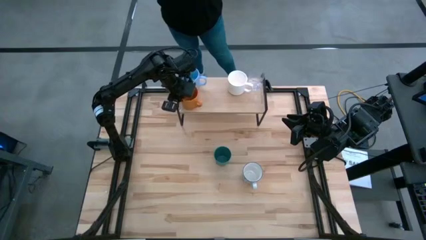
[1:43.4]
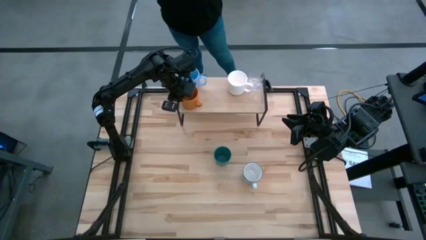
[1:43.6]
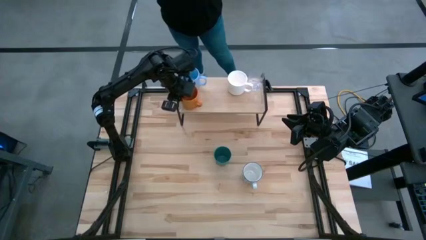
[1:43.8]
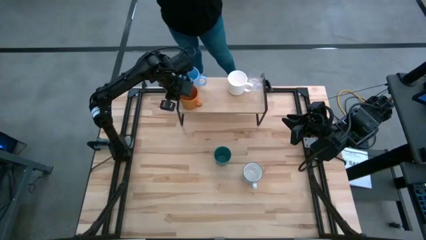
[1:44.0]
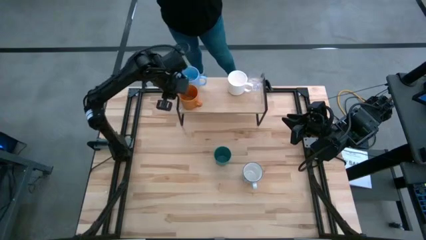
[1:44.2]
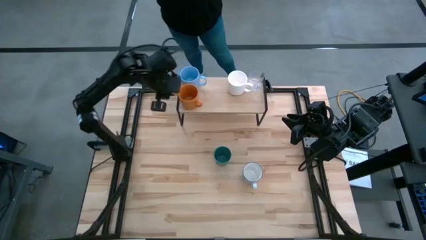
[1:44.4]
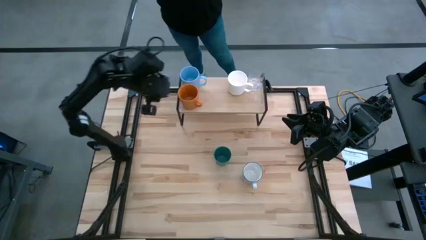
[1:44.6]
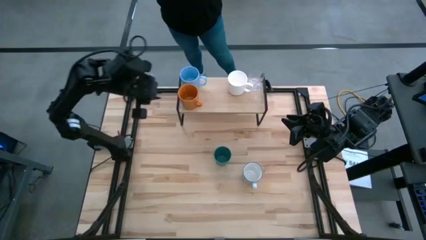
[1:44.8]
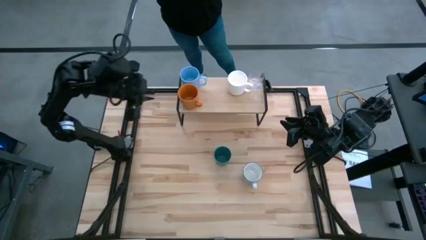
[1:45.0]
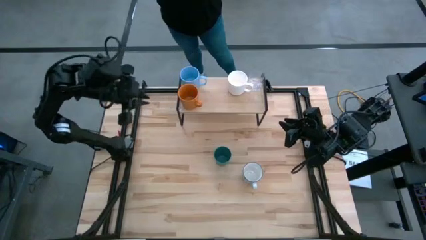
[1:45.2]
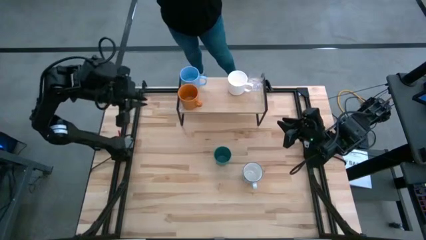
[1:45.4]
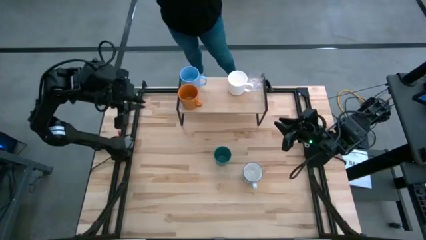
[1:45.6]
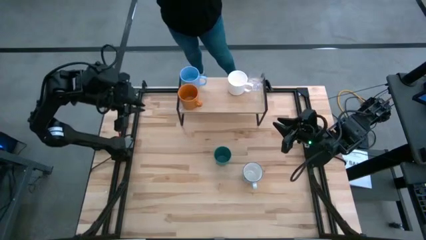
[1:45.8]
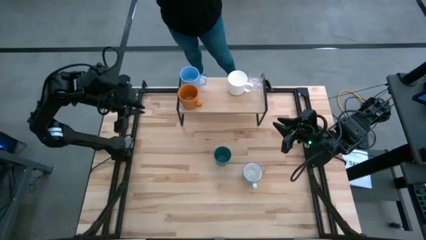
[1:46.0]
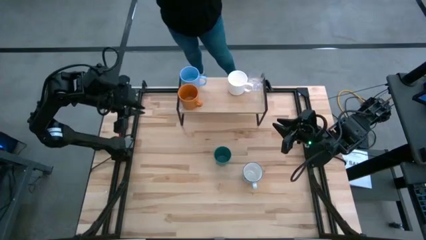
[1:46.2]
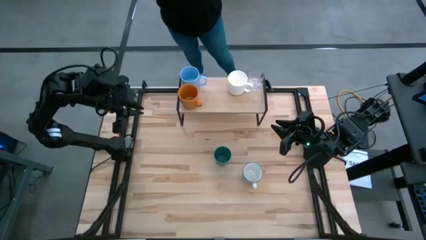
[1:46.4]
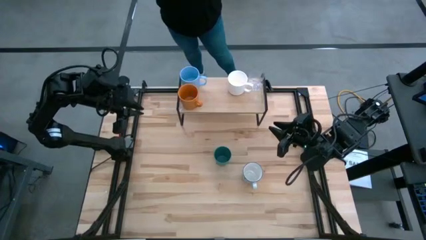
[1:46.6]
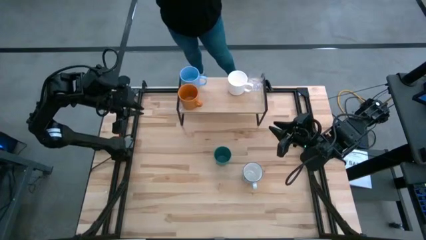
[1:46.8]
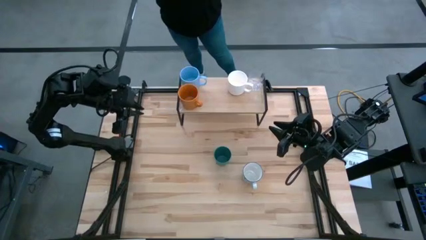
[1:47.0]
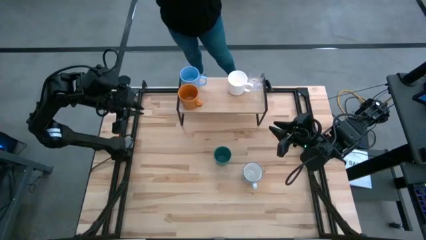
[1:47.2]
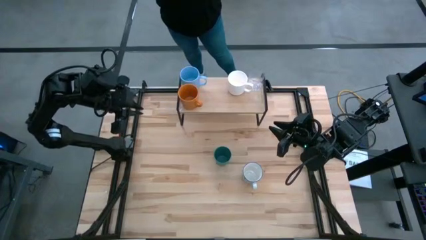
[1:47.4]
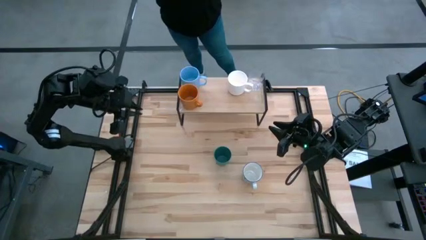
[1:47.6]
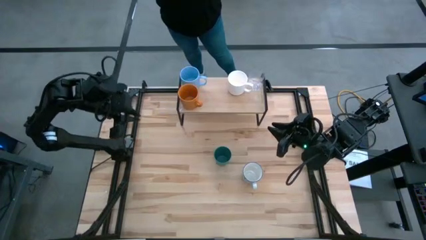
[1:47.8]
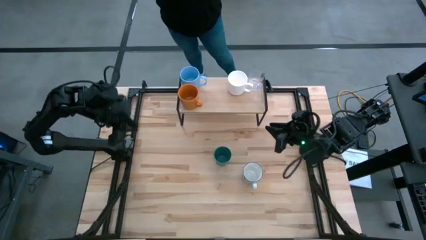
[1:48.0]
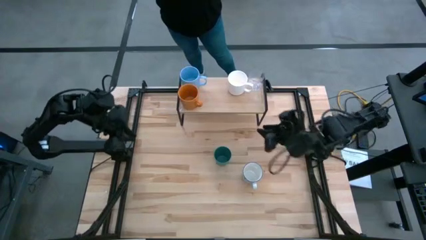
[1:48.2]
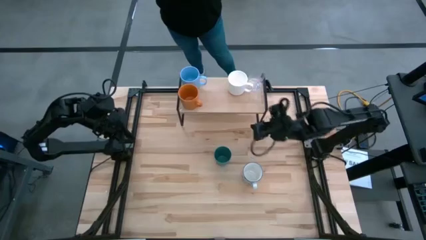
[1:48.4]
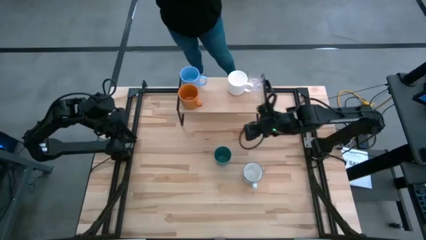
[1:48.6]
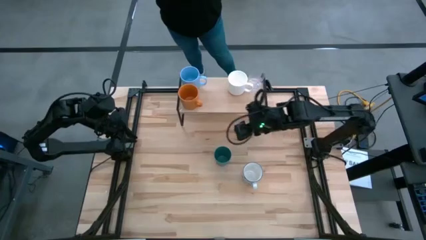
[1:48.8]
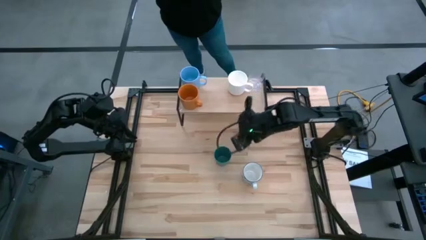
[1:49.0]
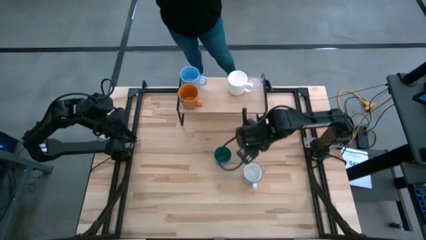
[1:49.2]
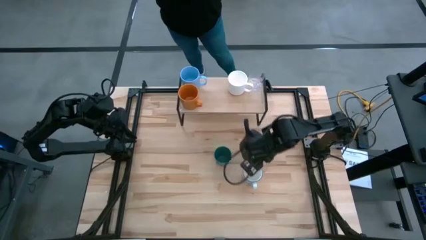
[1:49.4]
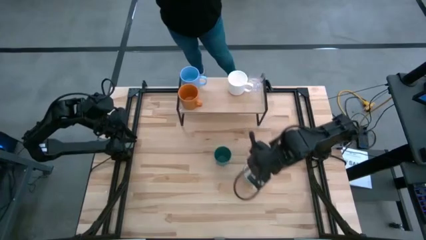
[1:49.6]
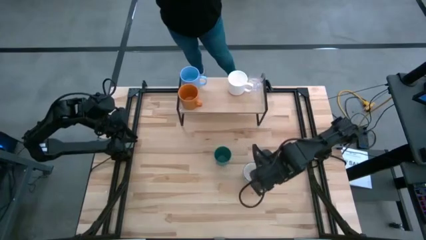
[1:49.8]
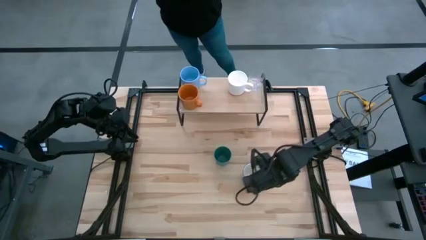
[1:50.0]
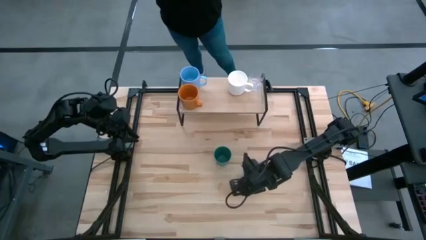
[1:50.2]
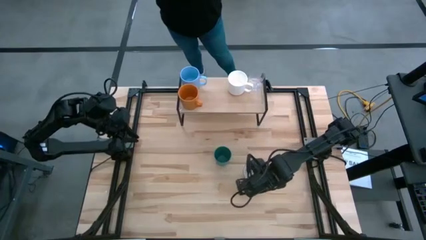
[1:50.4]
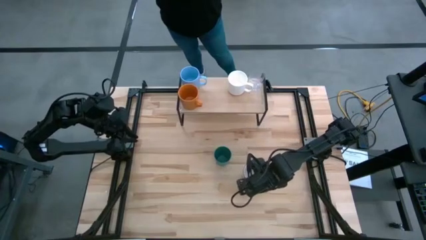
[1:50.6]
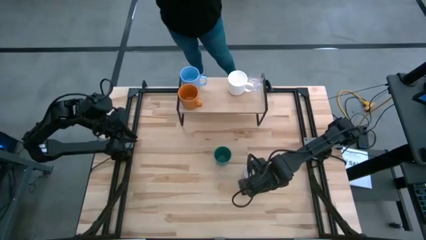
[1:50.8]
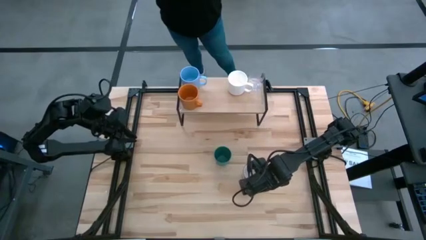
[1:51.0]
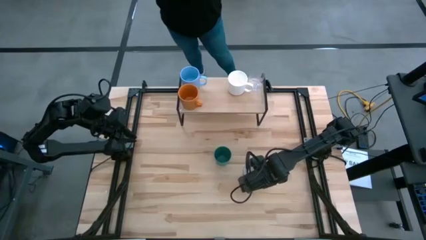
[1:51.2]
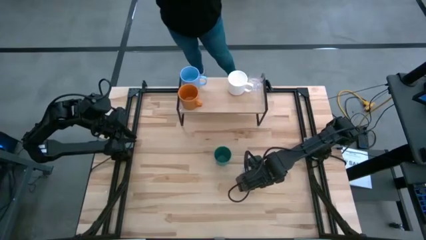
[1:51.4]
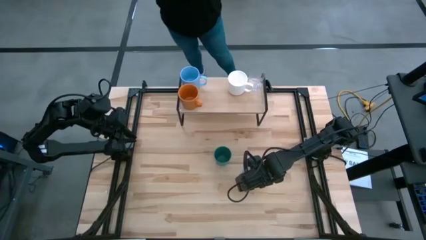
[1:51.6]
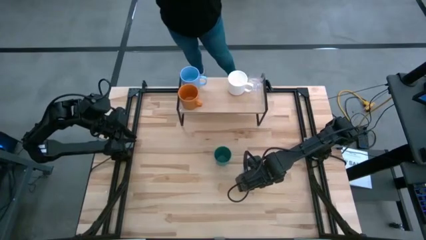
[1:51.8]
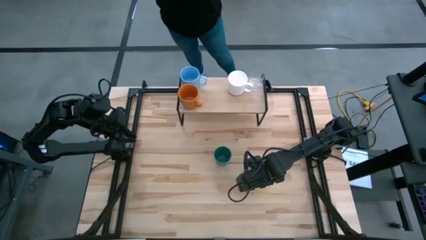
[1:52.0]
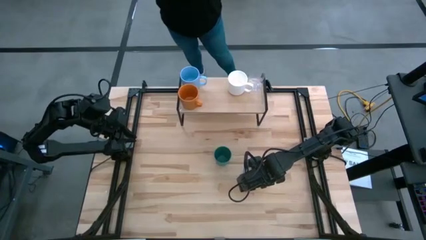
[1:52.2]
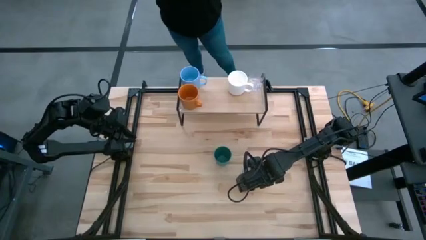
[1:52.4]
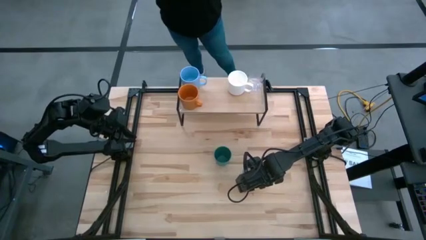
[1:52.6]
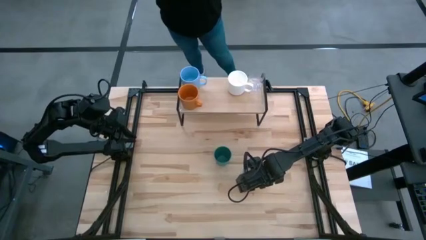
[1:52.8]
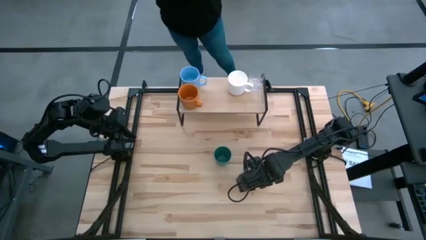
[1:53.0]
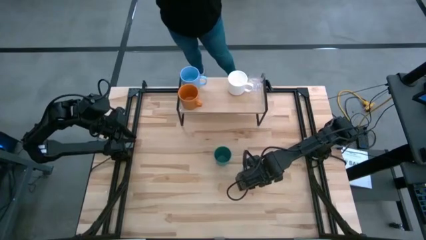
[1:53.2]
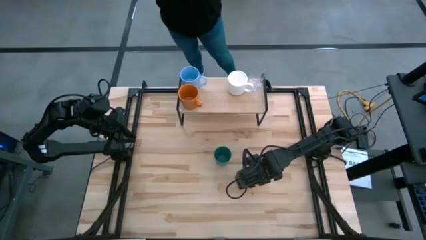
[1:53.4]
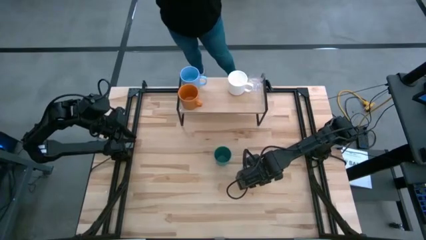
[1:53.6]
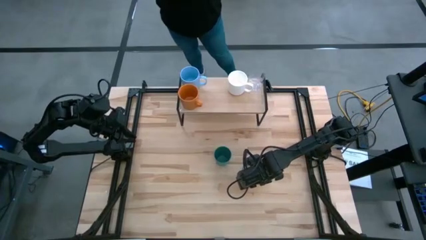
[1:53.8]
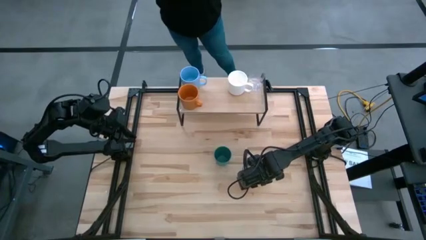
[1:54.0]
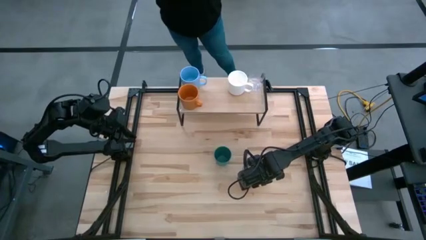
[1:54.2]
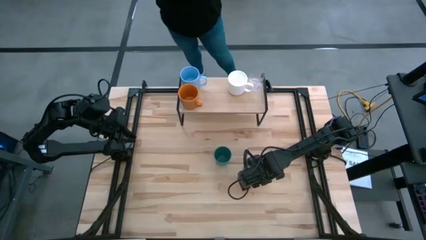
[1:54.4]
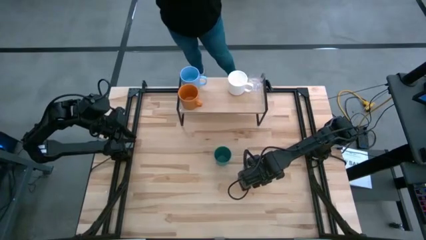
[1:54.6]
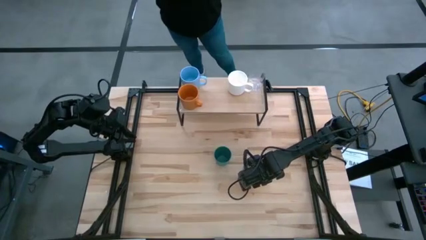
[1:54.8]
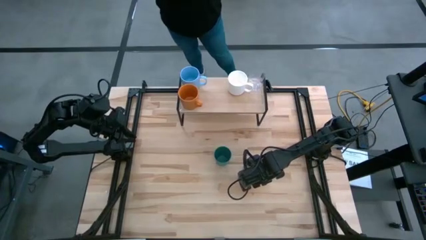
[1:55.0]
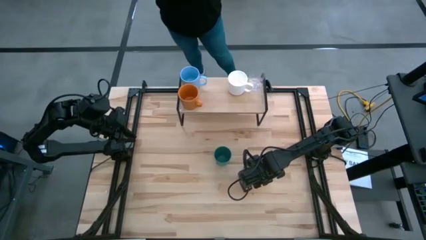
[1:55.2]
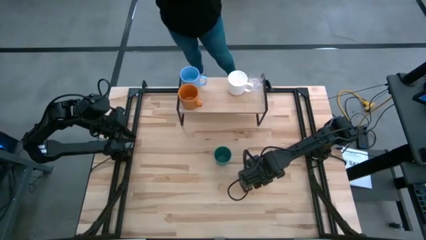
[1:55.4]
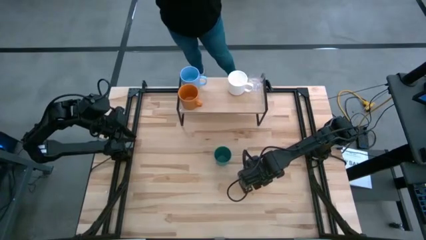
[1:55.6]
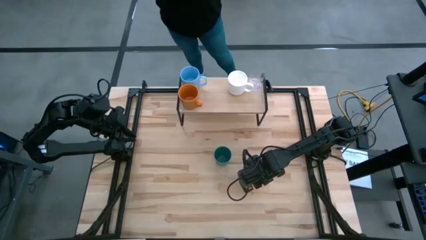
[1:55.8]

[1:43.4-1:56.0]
Task: Stack small to large cups/mugs on shelf
Put the blue patterned mug on the shelf

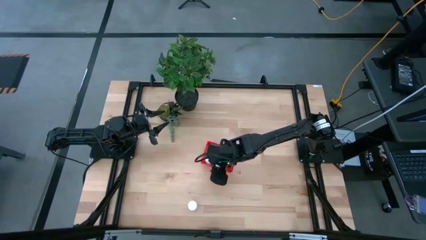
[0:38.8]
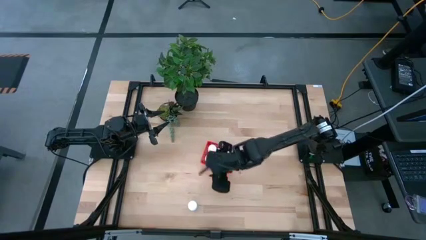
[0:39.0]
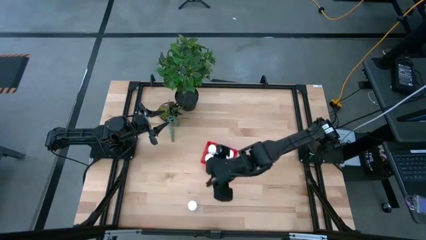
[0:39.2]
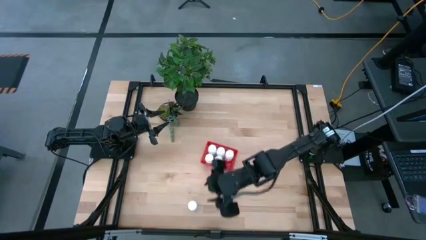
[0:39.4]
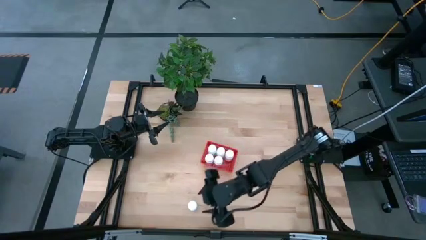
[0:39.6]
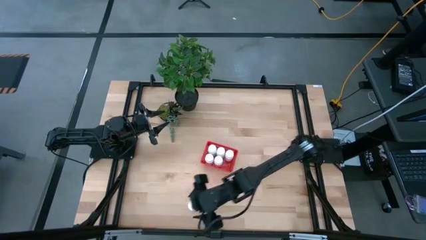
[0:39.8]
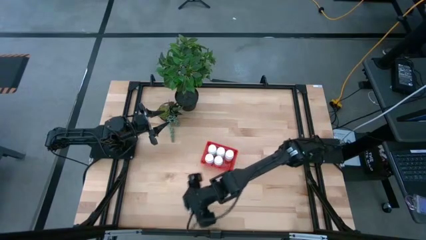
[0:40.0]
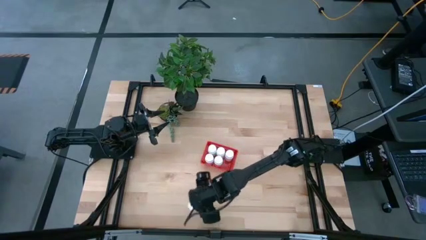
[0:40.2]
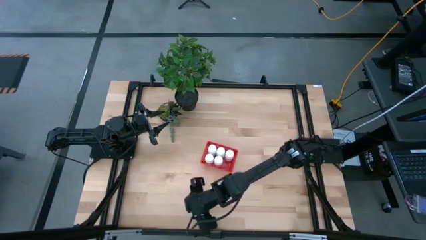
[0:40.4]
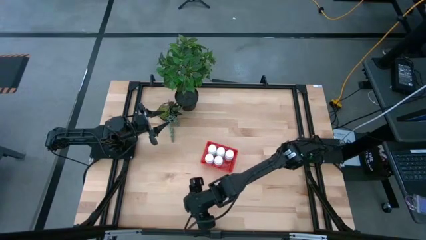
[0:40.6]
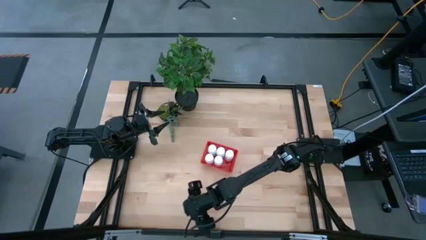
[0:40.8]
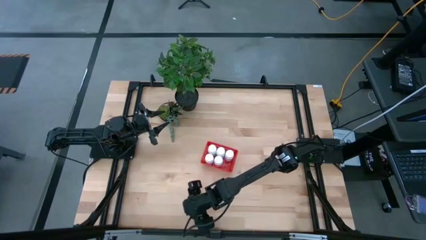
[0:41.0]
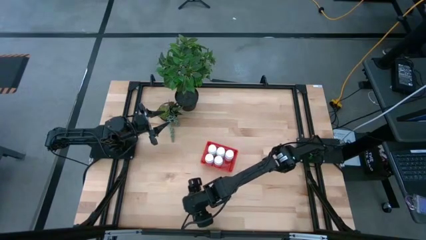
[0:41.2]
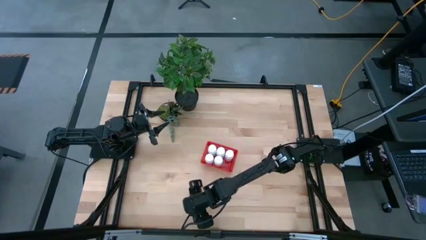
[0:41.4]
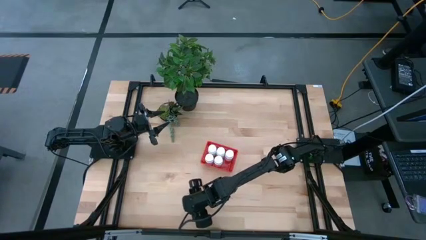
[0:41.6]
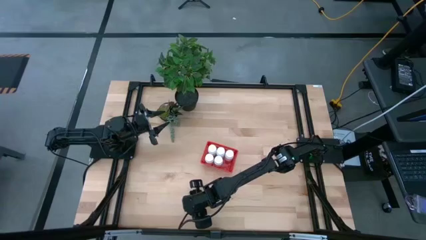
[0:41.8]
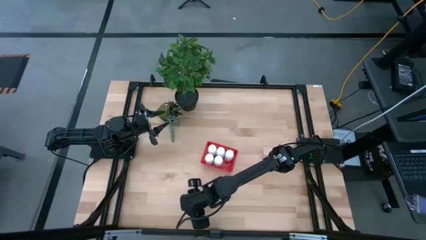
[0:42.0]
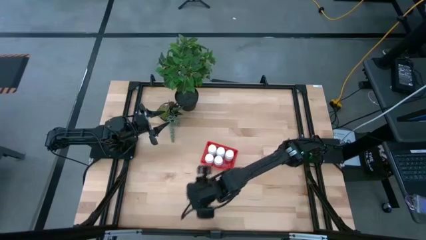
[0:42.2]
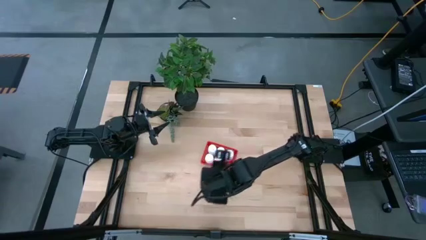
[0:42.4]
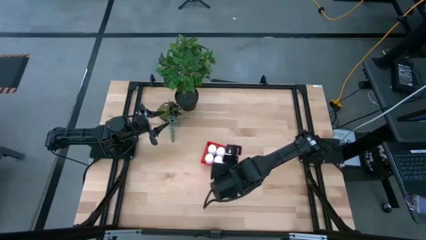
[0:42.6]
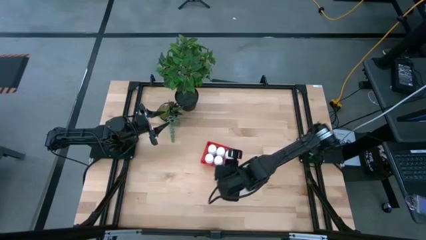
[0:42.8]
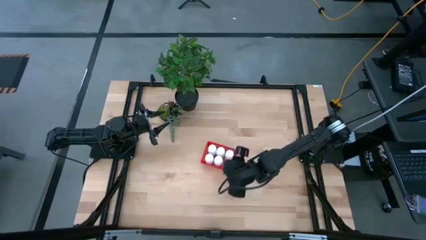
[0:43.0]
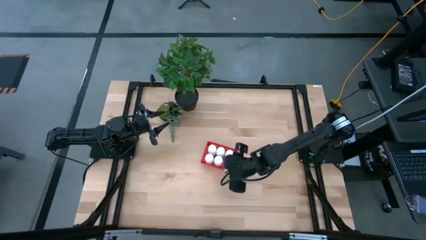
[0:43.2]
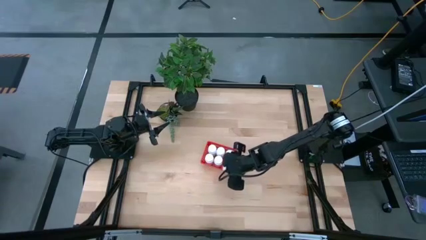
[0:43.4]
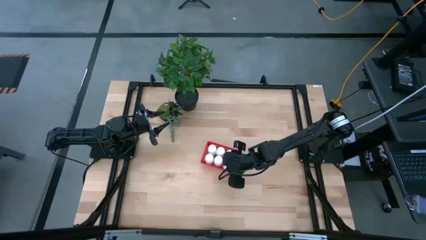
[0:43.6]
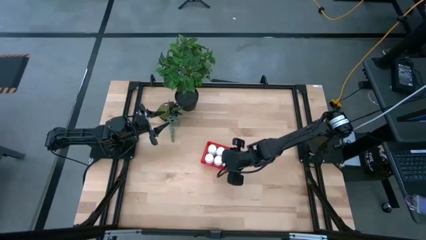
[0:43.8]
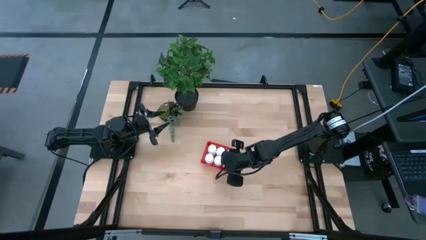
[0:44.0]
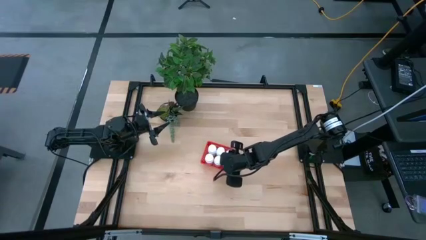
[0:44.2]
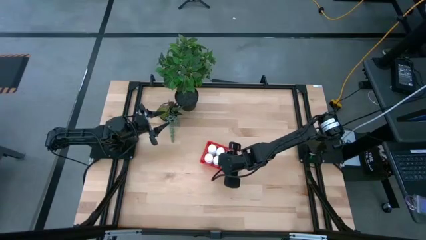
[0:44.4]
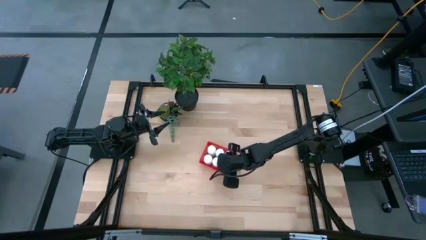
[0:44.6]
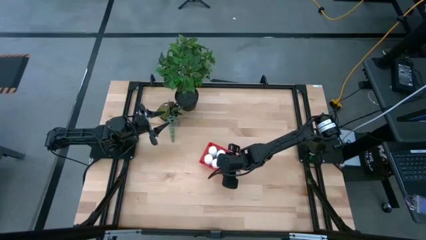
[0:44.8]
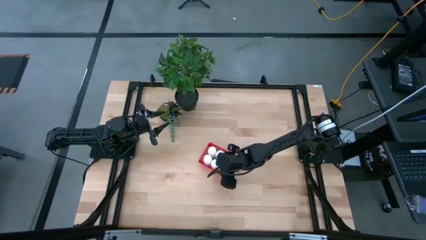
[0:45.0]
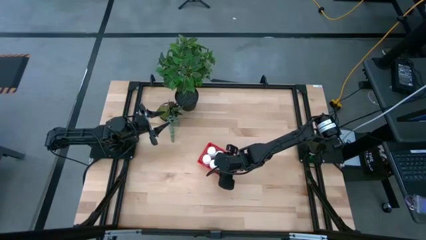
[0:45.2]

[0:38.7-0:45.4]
Task: Pick and place pill bottles into a basket
Put the white pill bottle into the red bin
